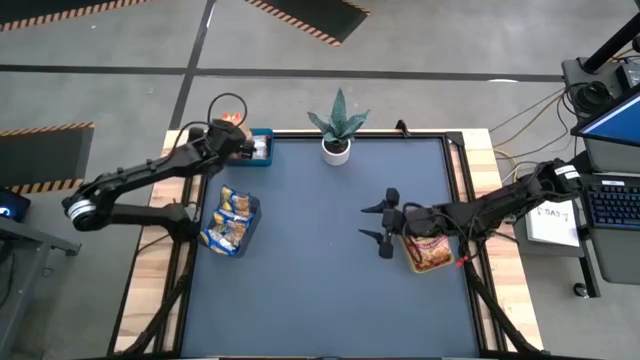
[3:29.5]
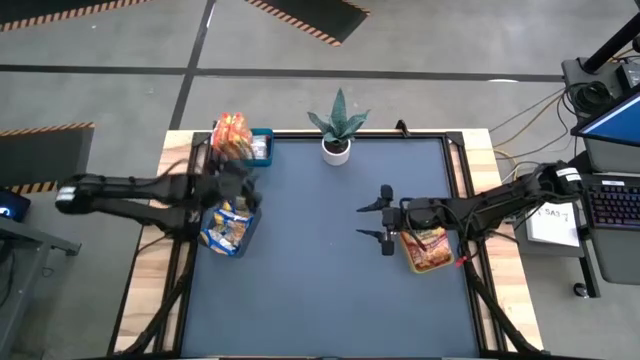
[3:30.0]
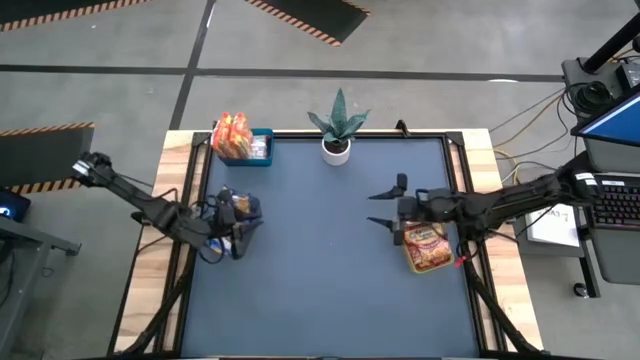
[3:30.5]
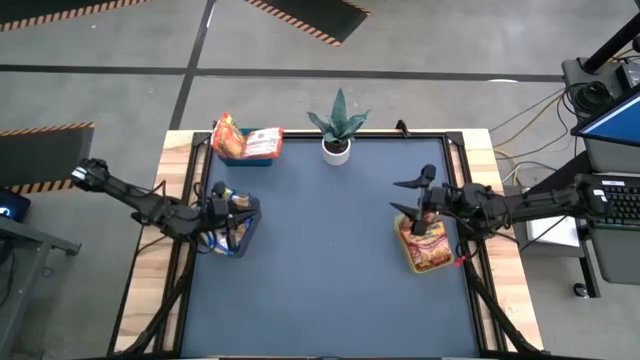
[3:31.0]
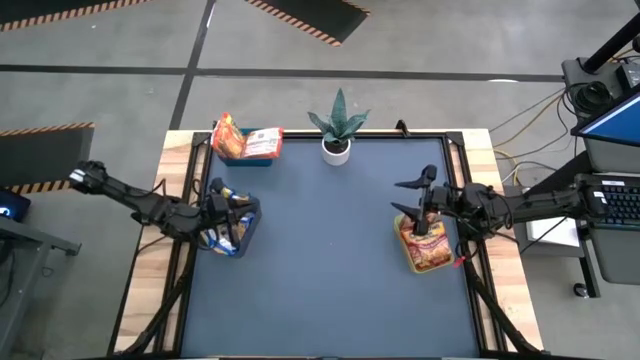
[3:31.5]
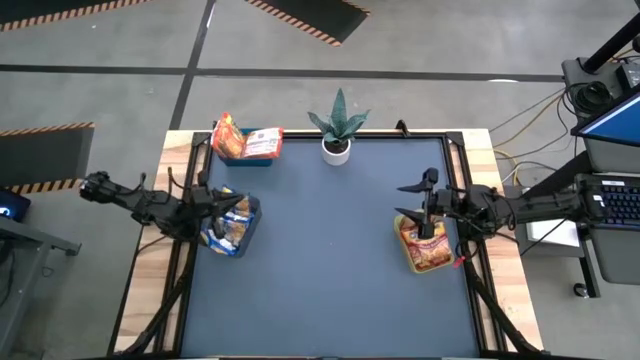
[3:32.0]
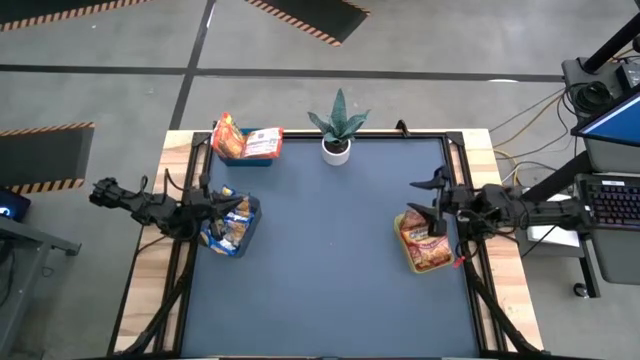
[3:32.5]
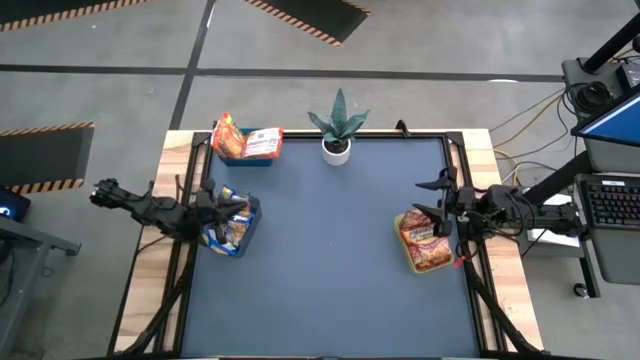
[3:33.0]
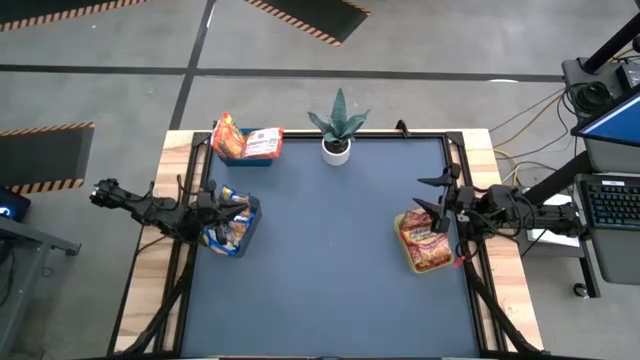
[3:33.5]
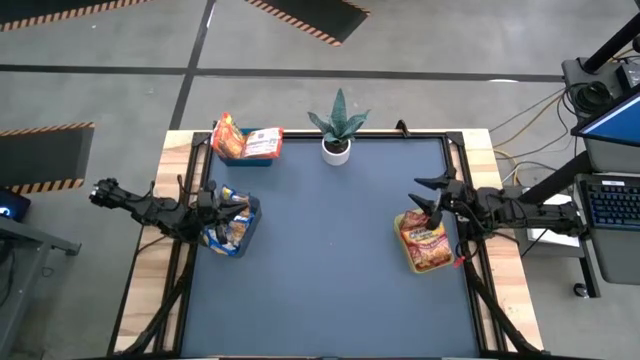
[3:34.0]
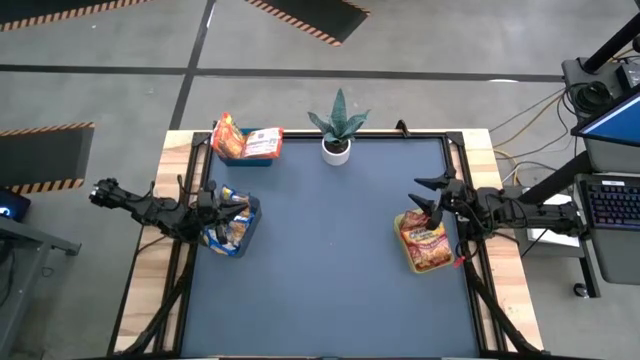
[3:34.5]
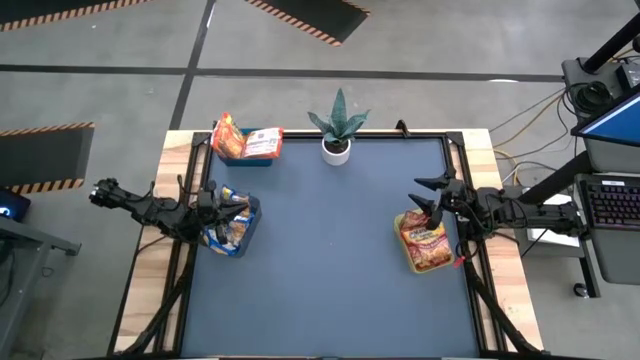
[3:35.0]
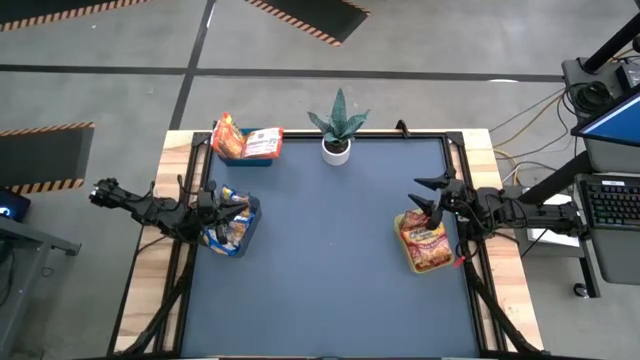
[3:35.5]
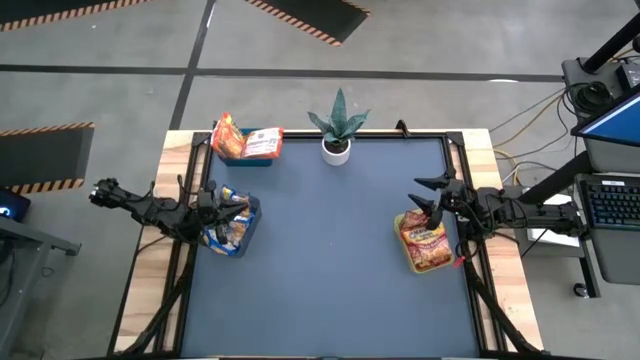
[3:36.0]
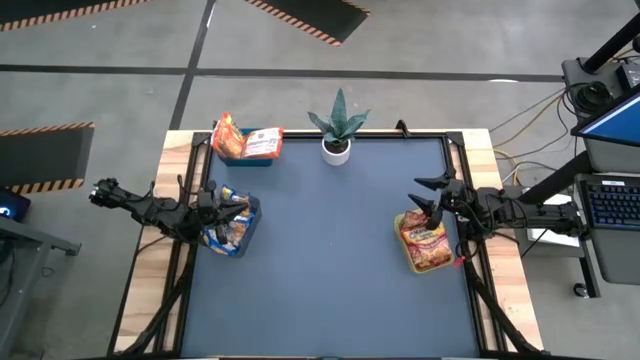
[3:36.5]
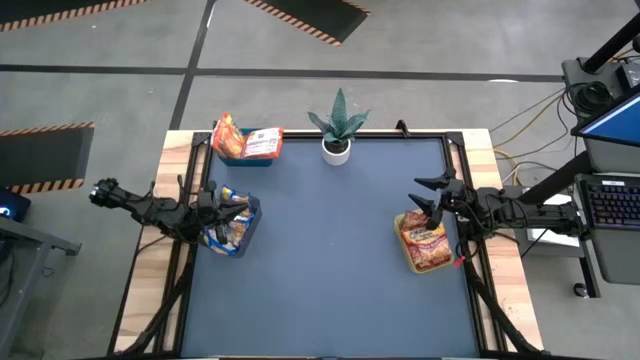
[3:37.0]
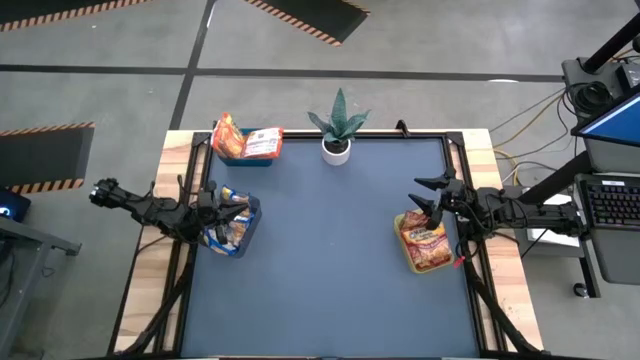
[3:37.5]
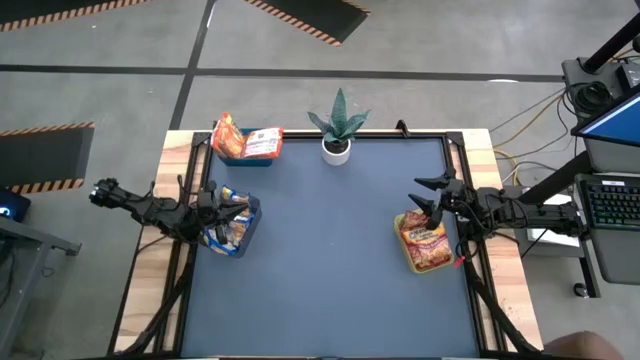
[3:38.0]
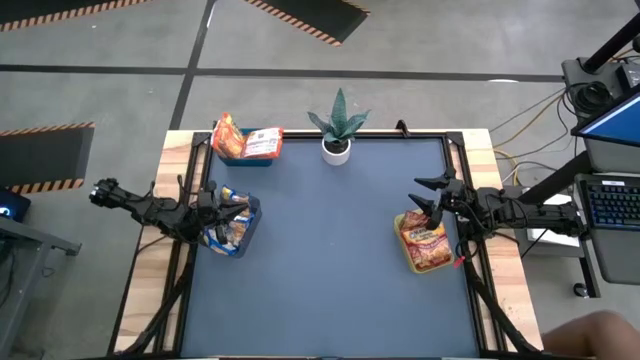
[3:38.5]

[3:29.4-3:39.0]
Task: Sort Maruchan noodles
Return to Home Position

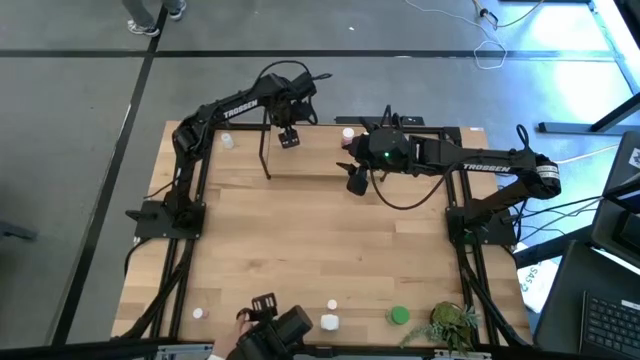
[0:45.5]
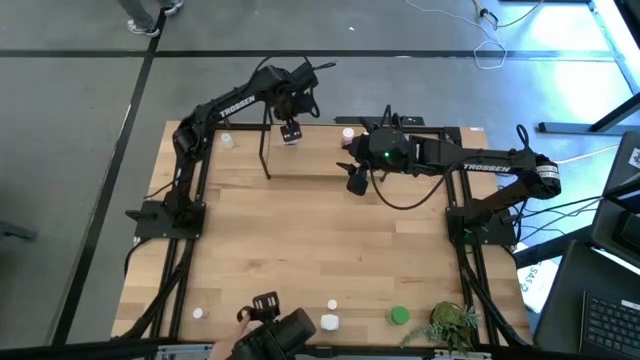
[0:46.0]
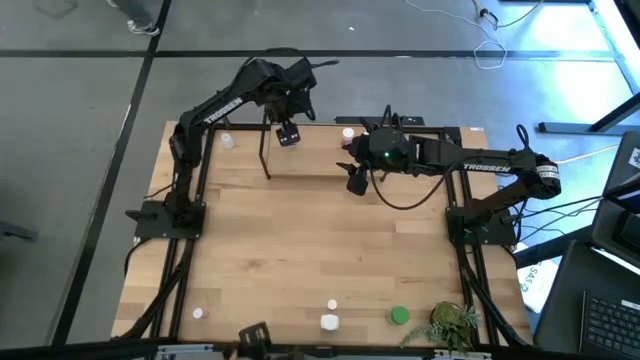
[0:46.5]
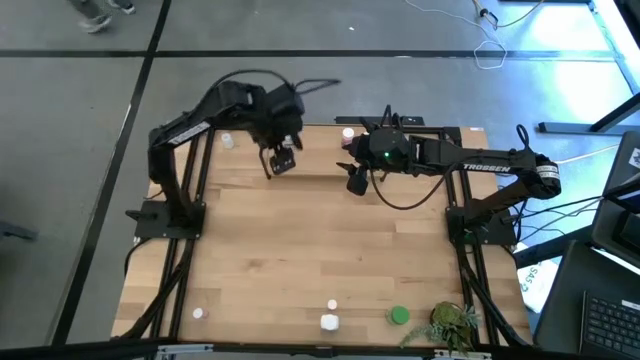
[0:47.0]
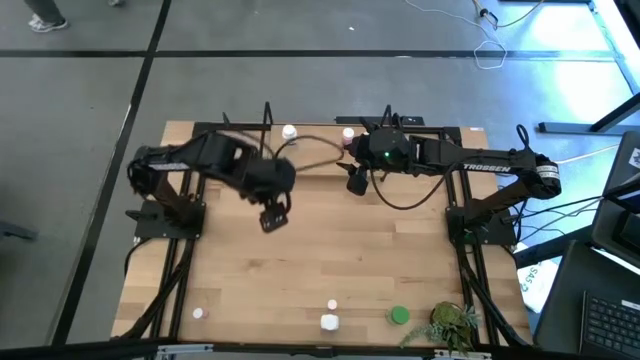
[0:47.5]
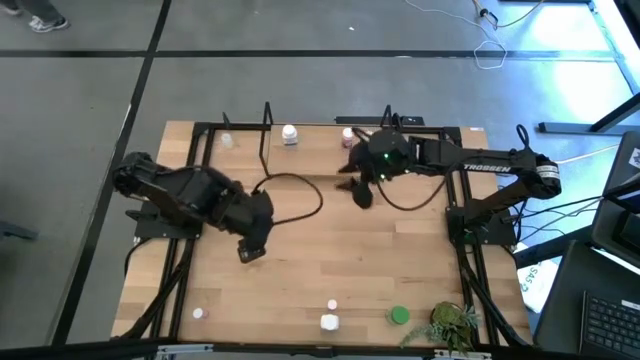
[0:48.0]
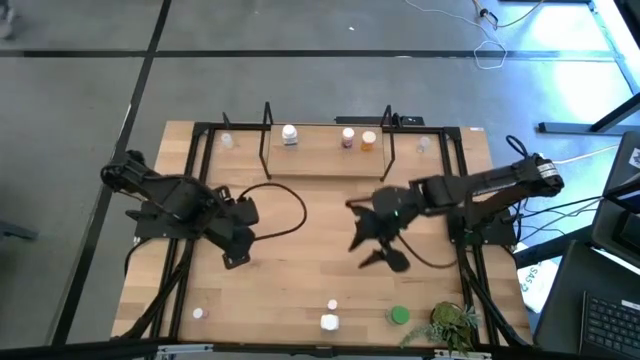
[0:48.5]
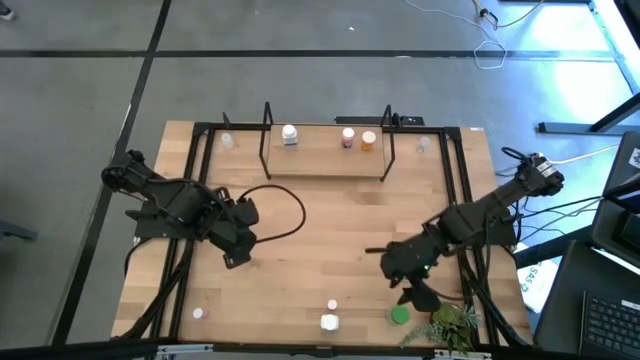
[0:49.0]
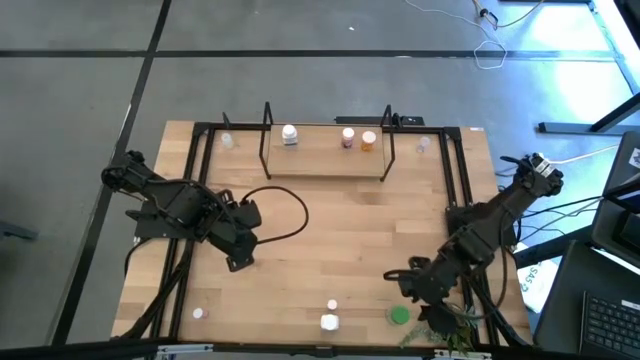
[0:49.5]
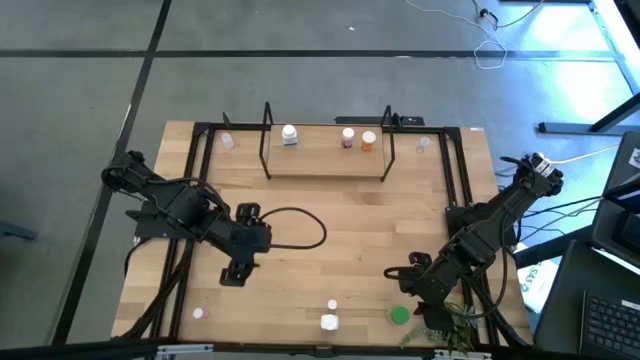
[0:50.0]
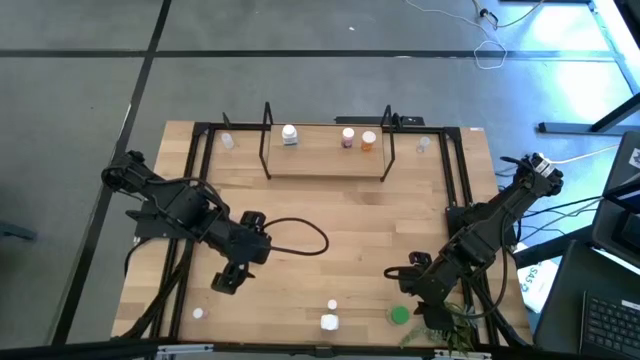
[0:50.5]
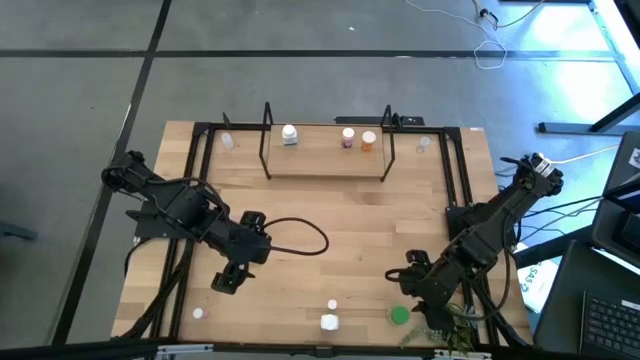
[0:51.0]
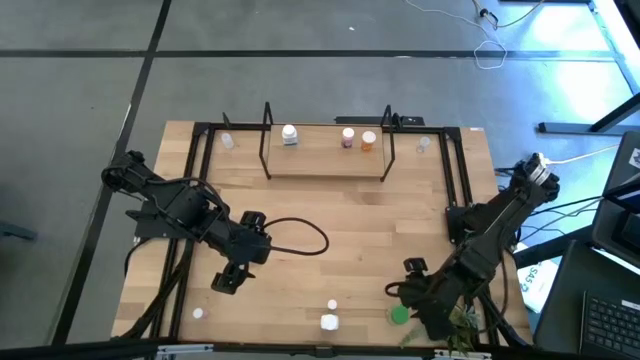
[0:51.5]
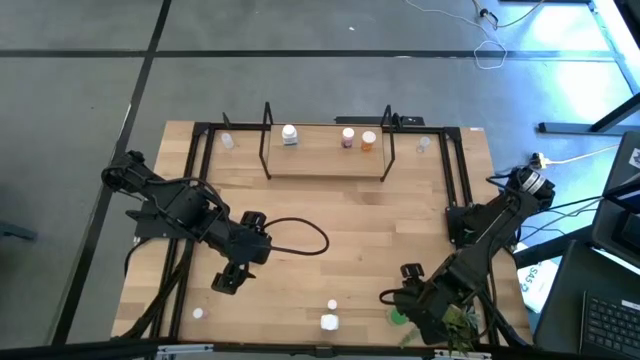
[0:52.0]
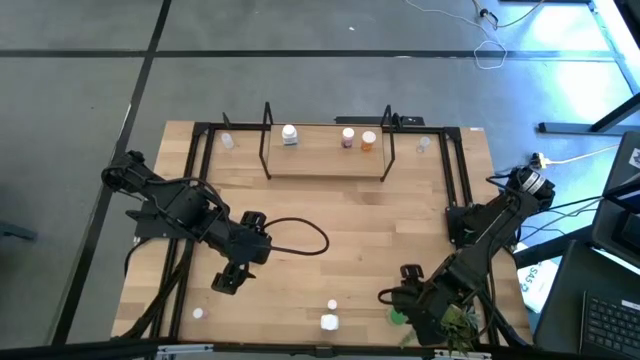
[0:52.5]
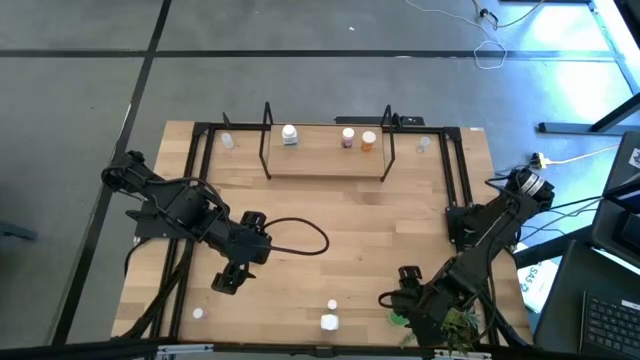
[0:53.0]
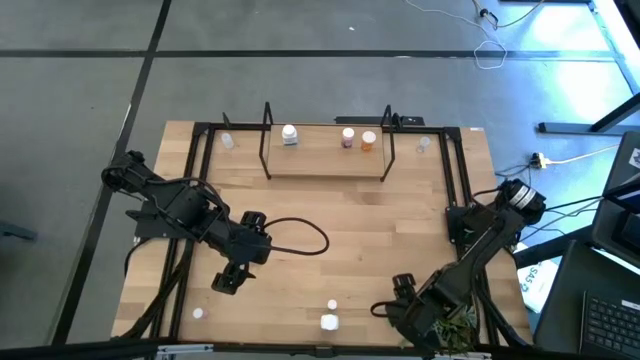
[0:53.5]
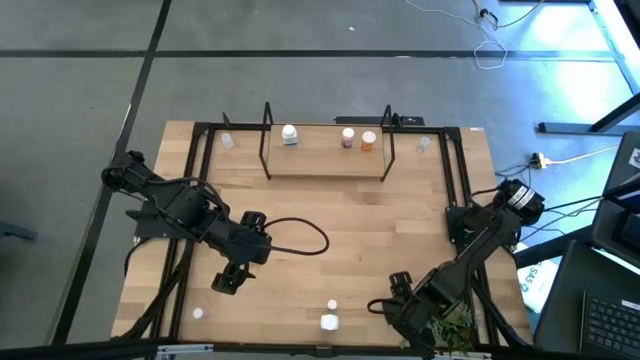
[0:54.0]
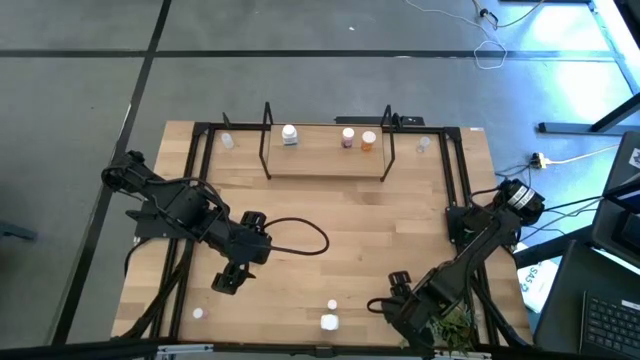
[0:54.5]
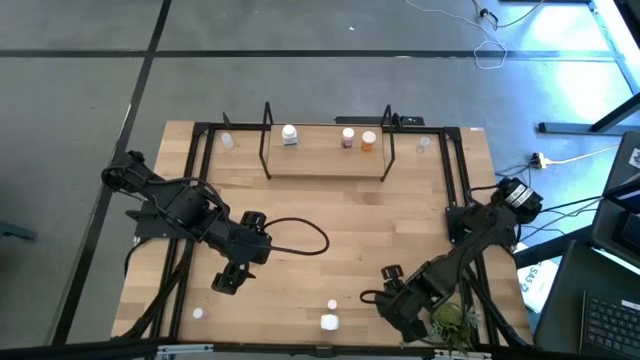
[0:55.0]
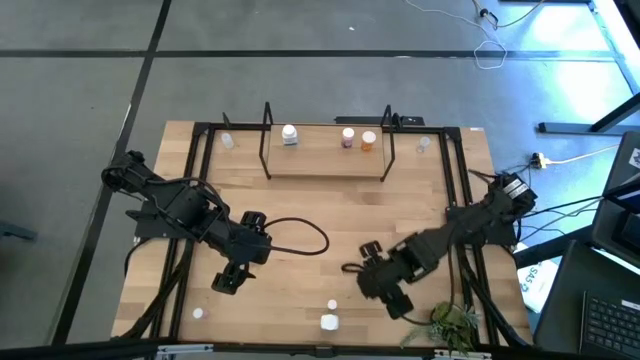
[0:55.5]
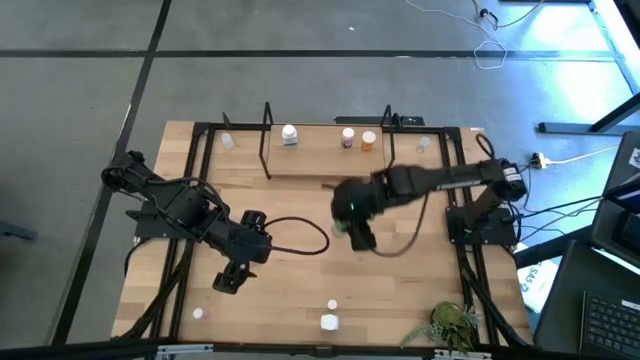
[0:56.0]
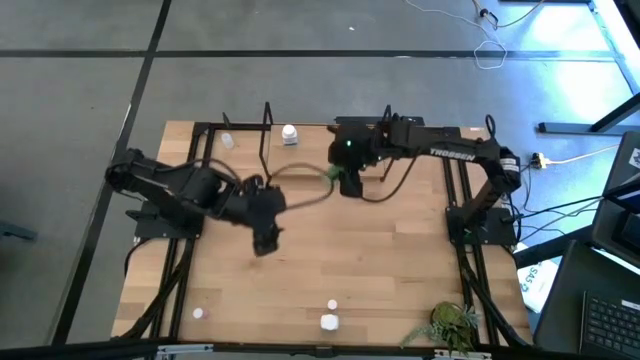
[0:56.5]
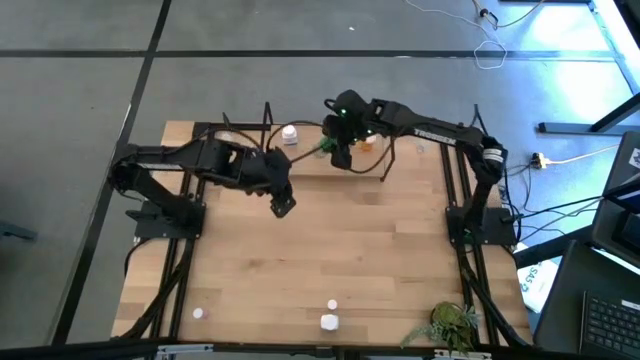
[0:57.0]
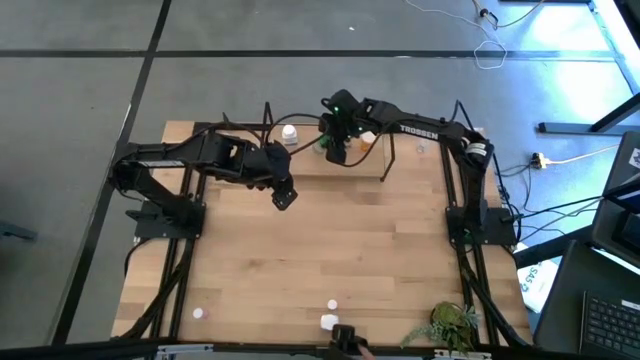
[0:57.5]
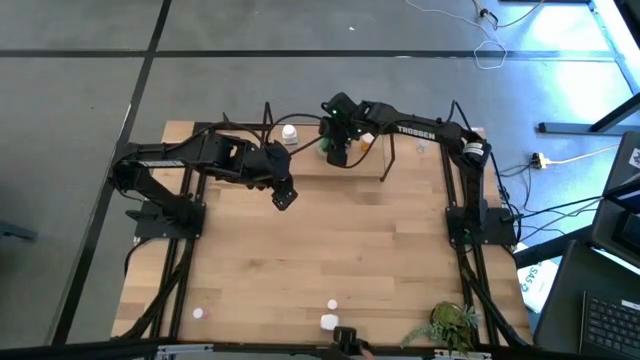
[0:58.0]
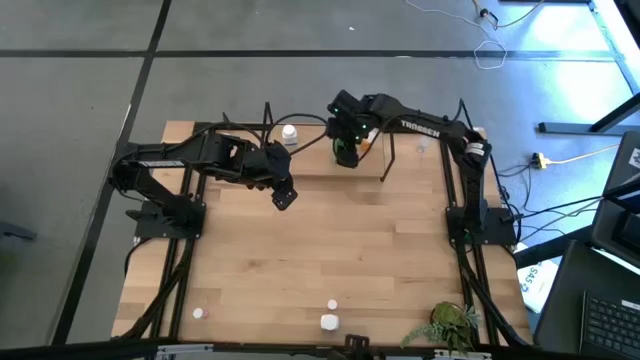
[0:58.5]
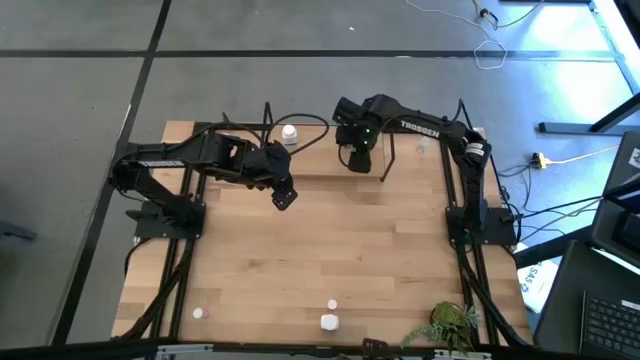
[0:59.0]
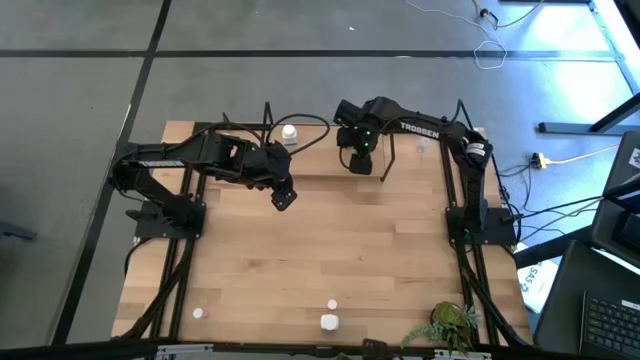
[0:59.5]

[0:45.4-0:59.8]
Task: Pick and place medicine bottles onto shelf by color
Put the green pill bottle on the shelf
